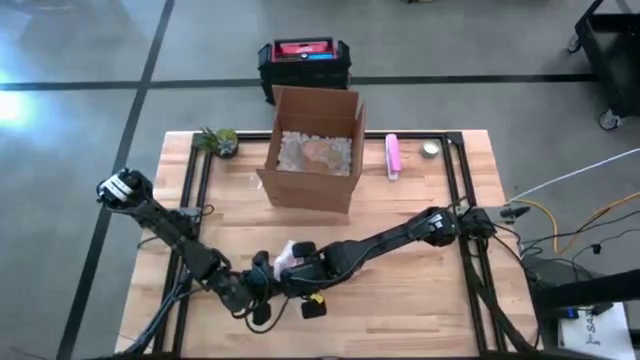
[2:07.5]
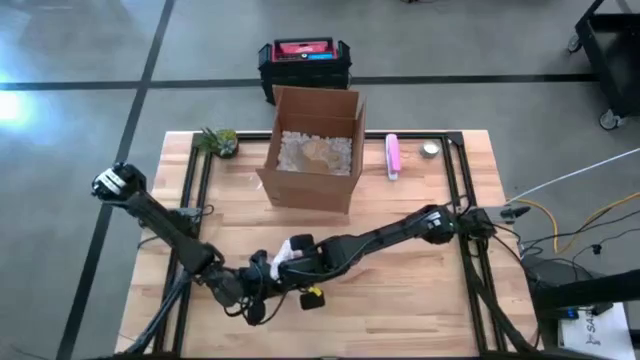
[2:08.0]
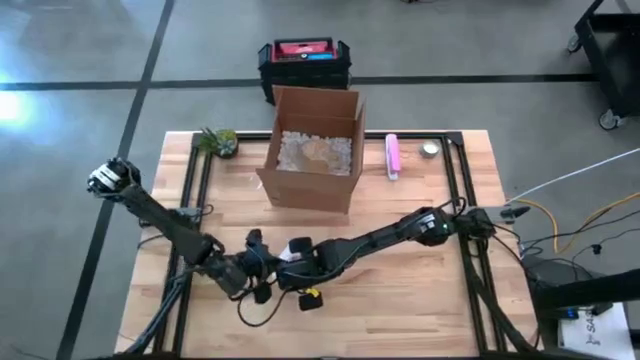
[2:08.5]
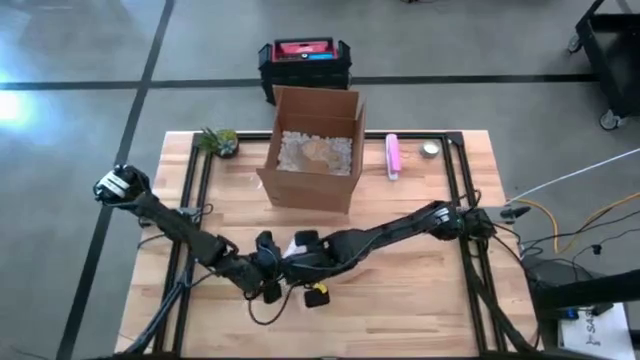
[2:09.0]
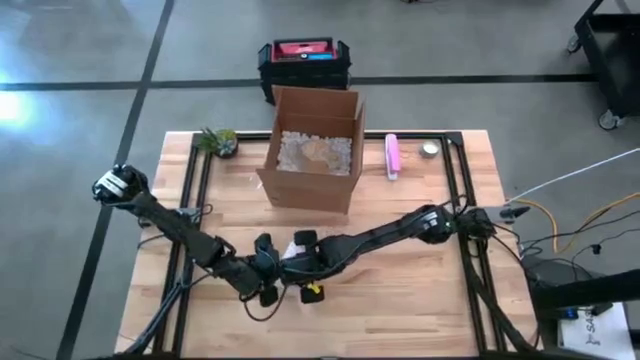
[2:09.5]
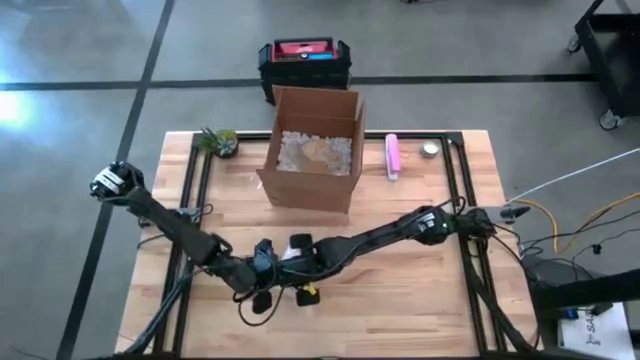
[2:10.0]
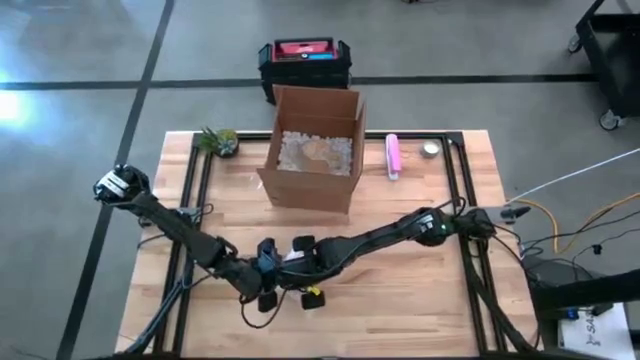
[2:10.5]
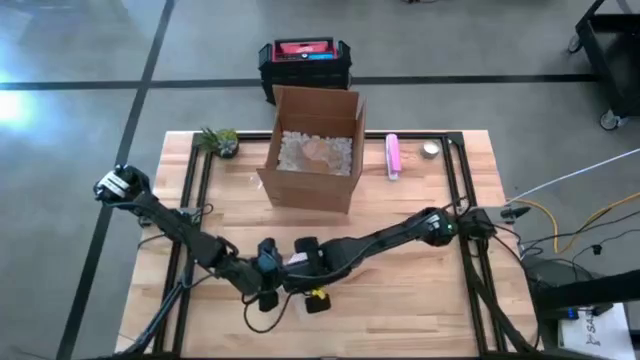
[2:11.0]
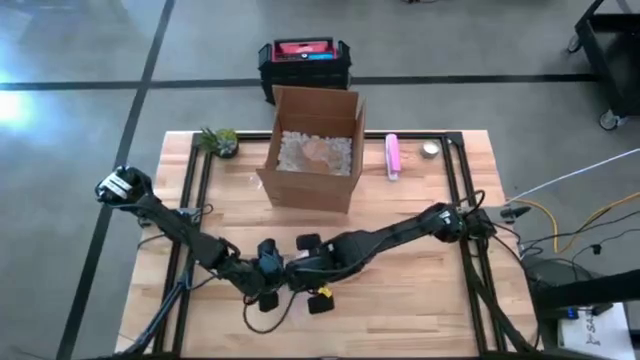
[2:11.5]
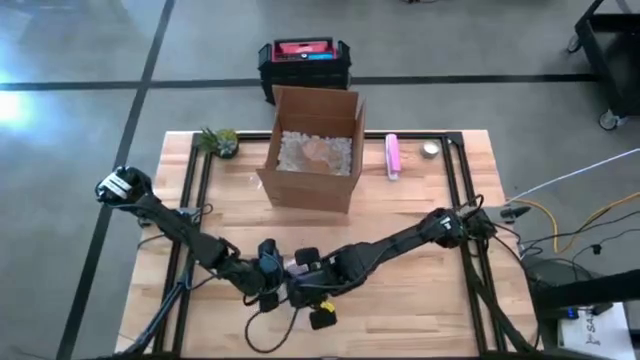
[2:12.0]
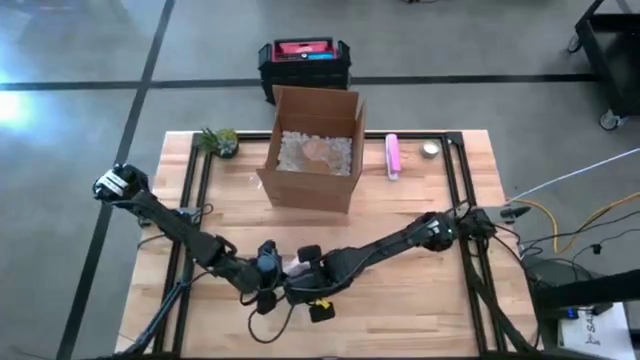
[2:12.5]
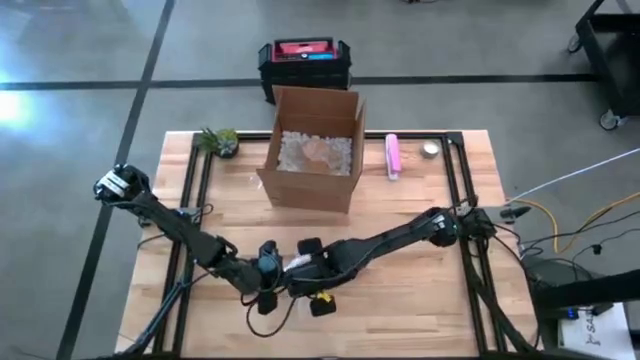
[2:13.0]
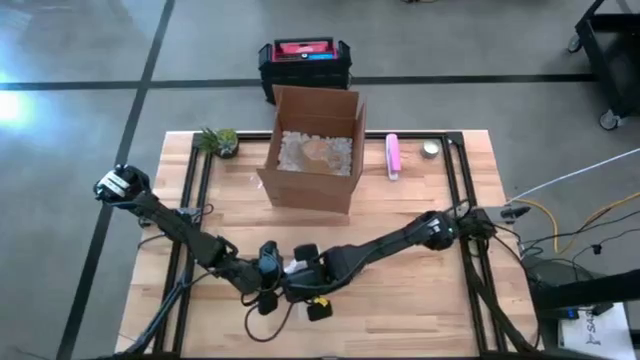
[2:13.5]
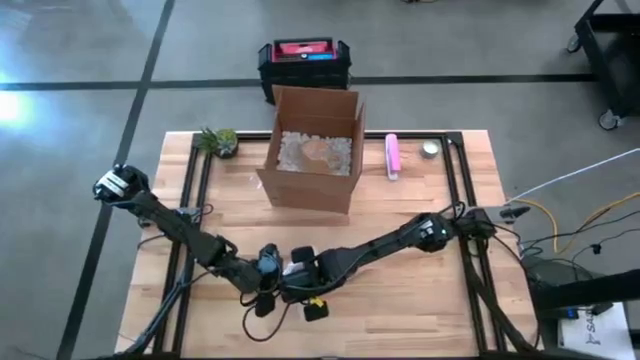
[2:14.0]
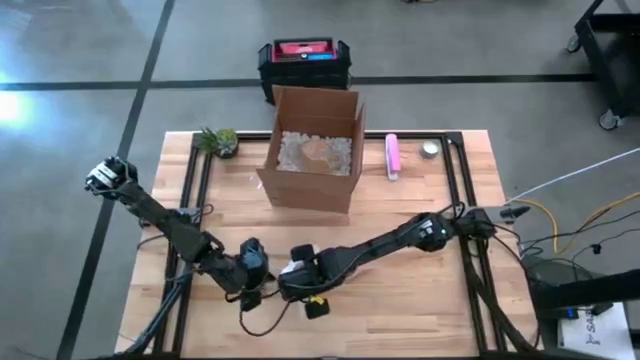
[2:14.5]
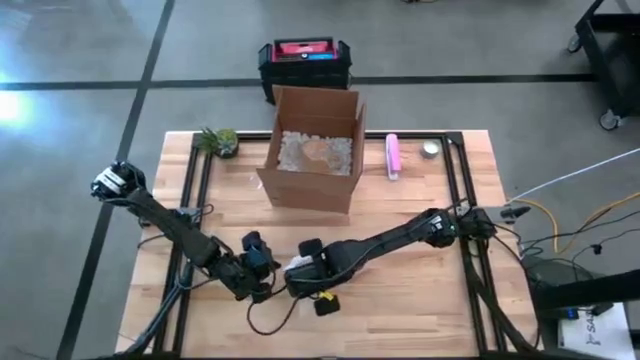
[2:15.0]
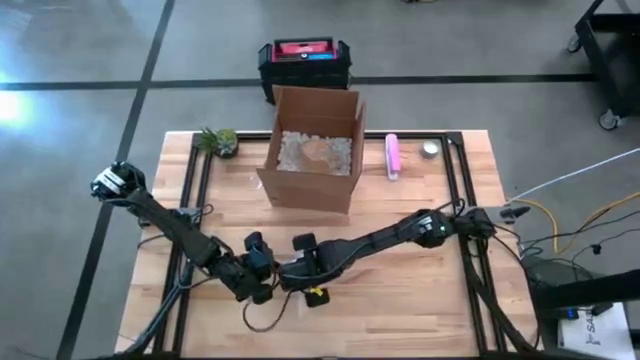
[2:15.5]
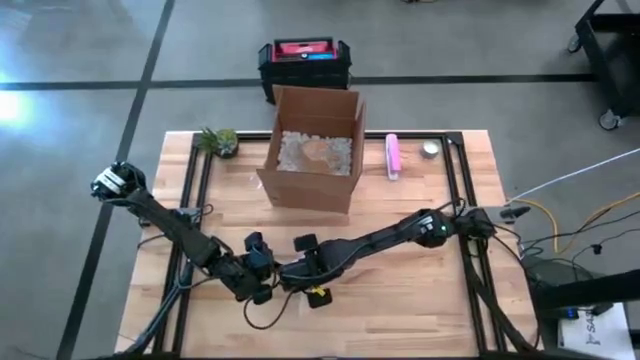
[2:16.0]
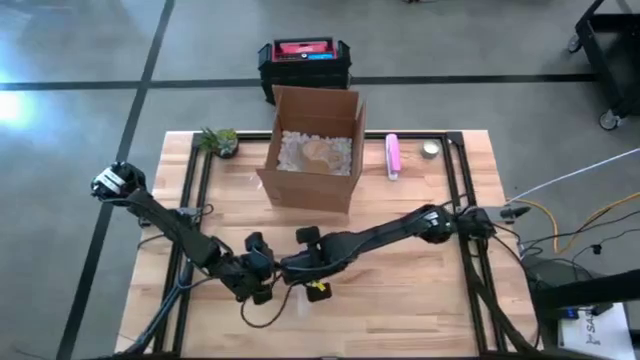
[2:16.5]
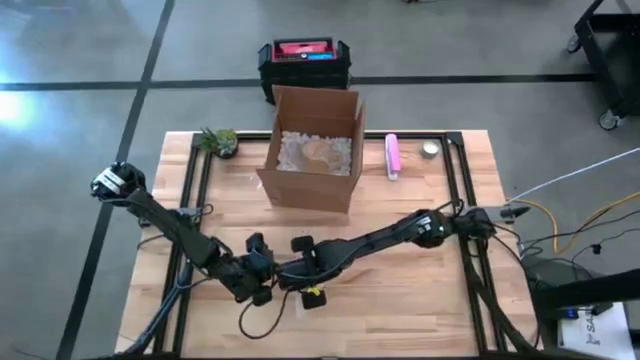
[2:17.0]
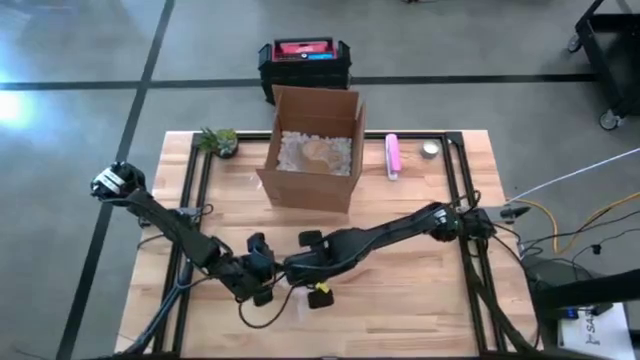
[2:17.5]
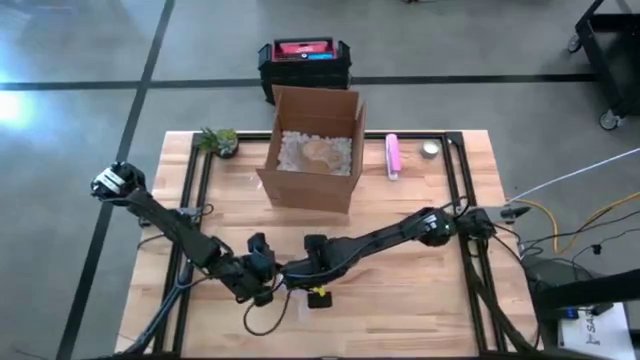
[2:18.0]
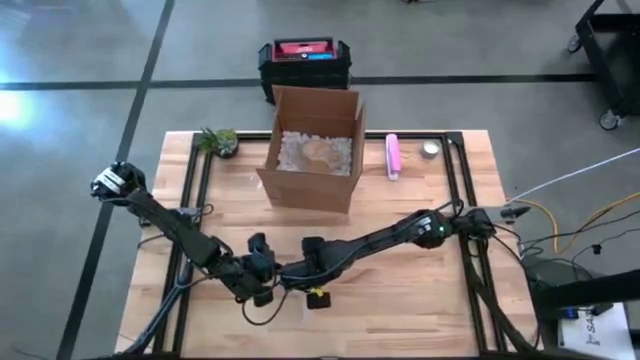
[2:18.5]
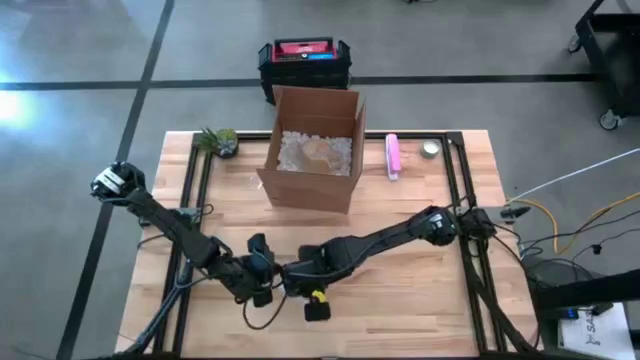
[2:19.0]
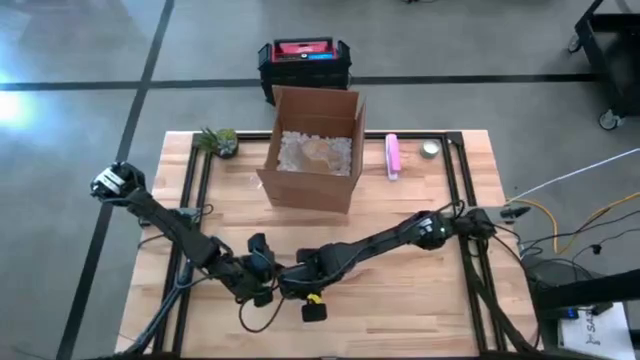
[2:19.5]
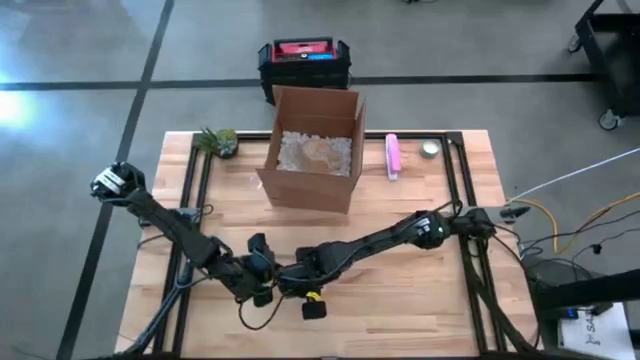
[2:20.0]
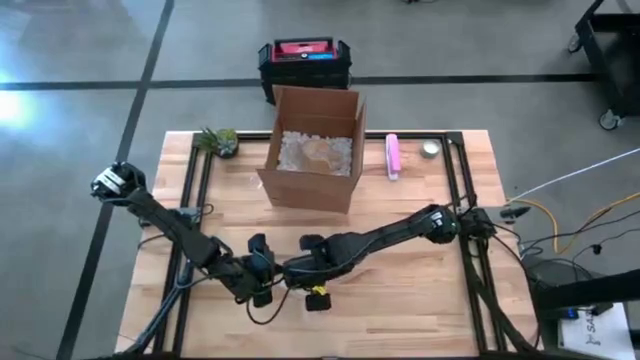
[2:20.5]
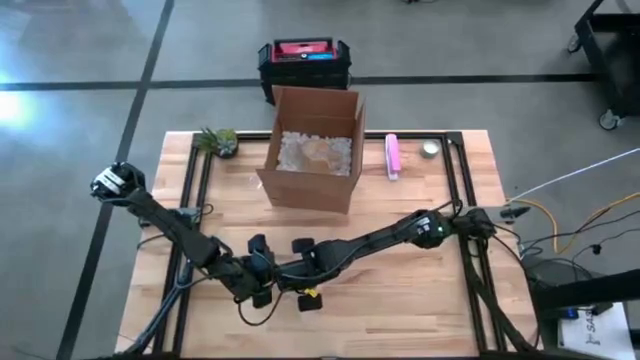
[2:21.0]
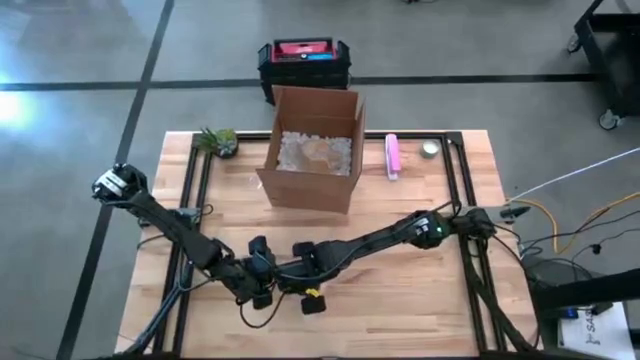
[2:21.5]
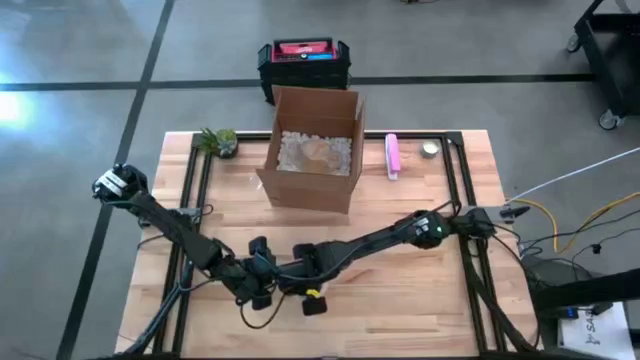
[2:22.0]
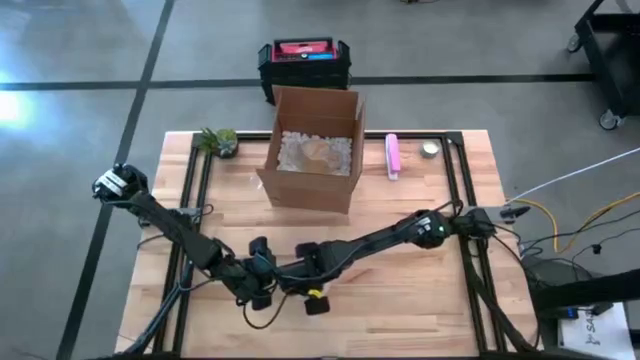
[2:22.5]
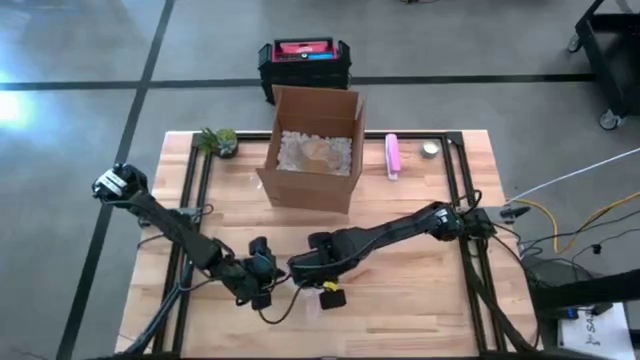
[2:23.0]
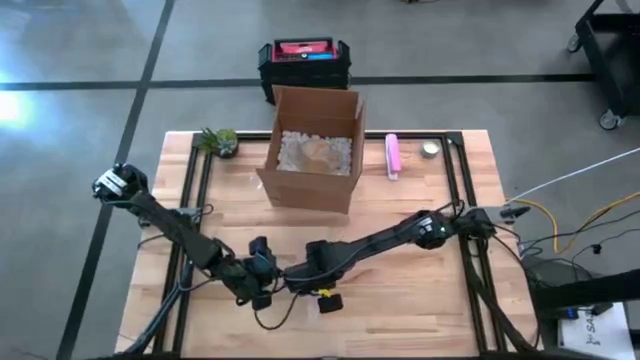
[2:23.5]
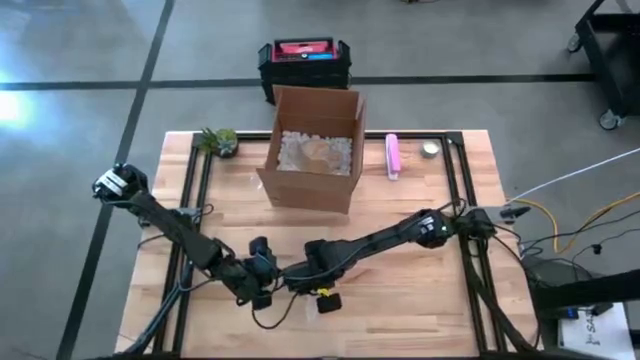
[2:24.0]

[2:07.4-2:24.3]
Task: wrap mug
Wrap the orange mug with transparent bubble wrap

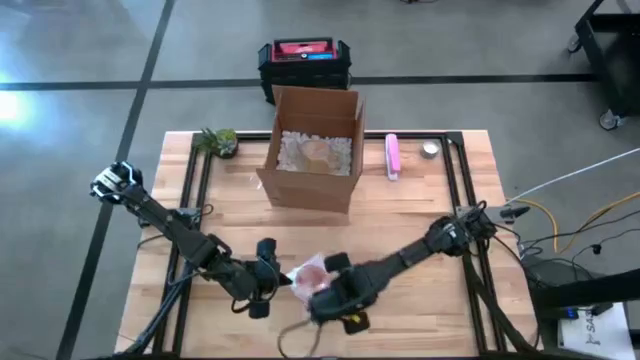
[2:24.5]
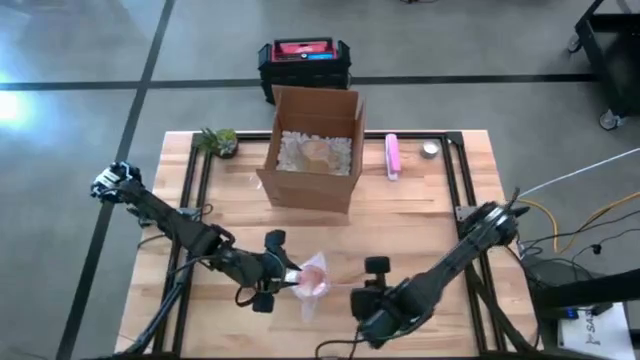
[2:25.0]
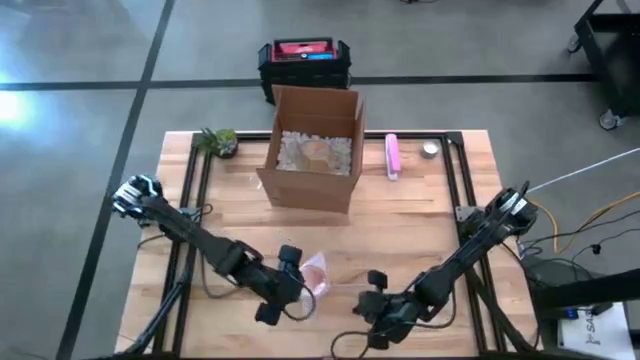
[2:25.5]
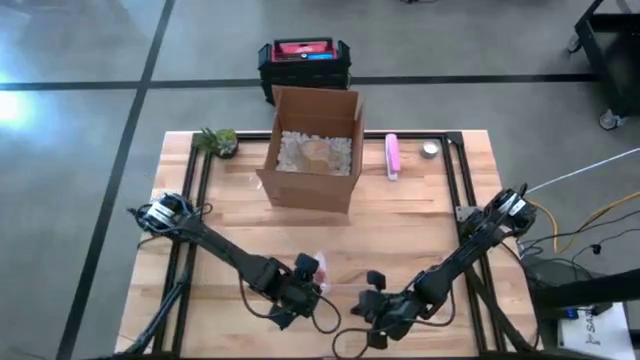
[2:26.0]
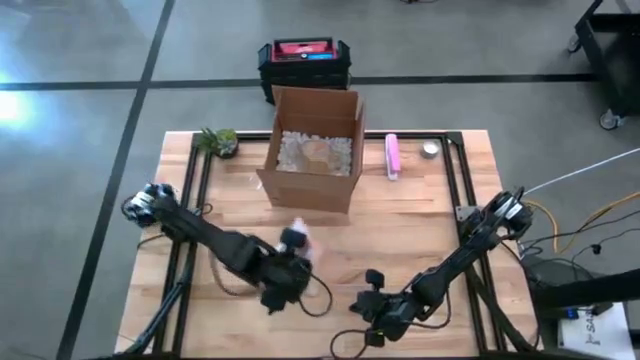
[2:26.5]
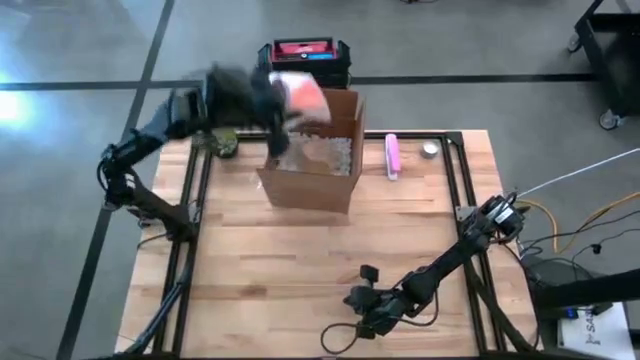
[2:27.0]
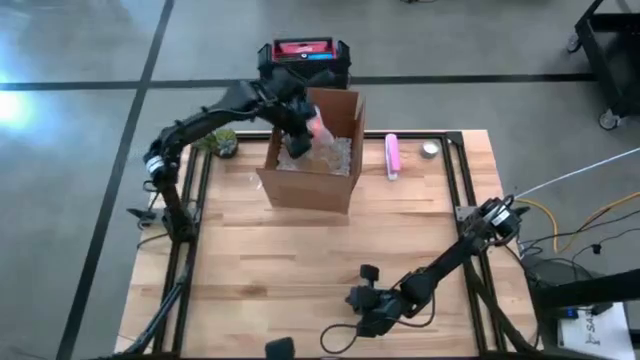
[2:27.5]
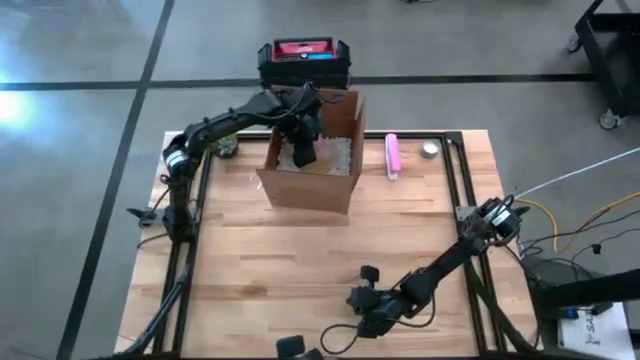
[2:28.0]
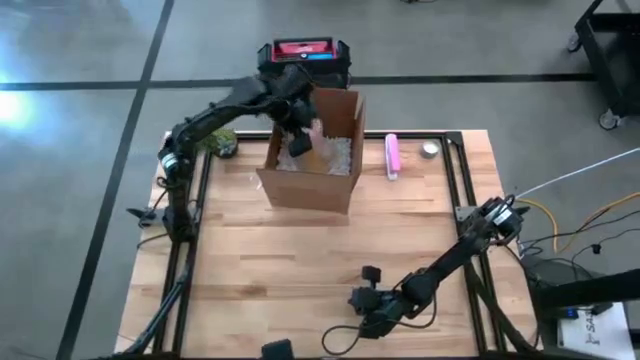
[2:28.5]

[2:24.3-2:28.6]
Put the wrapped yellow mug into the brown cardboard box
